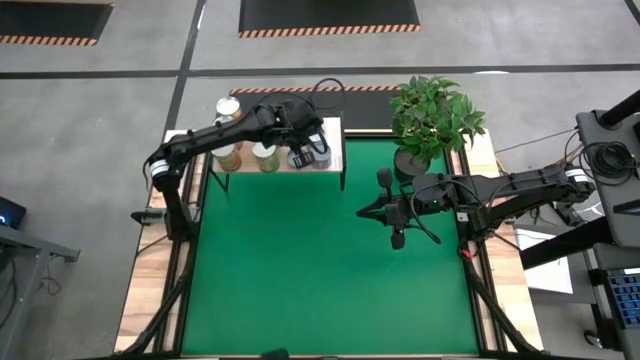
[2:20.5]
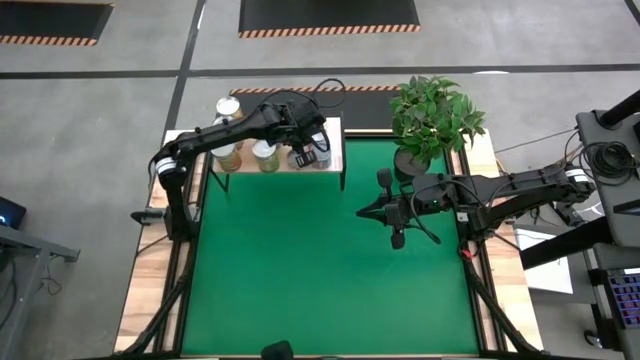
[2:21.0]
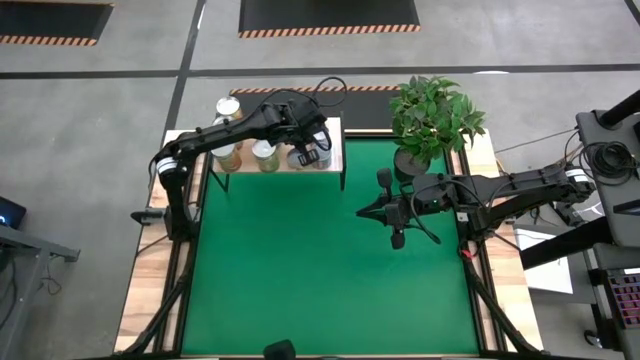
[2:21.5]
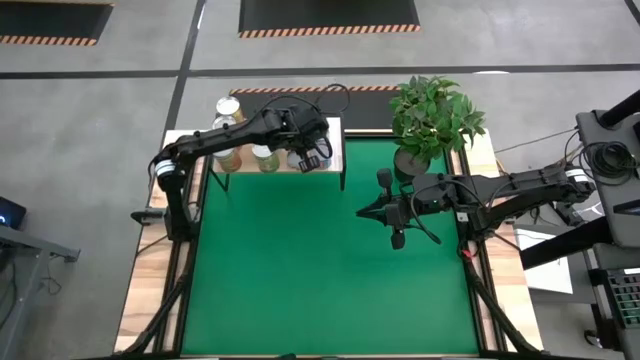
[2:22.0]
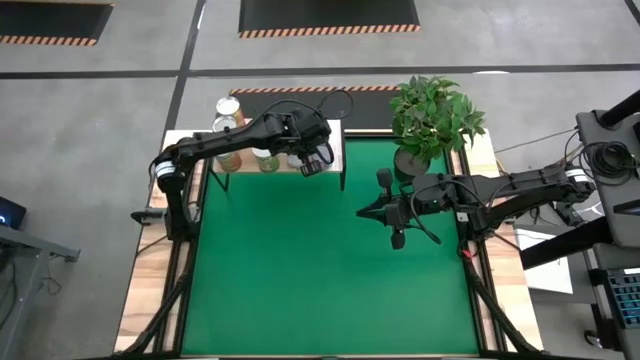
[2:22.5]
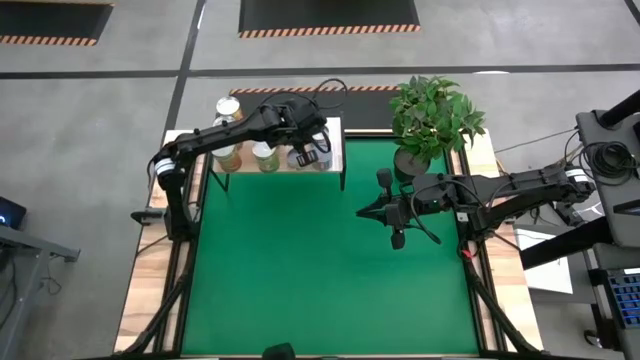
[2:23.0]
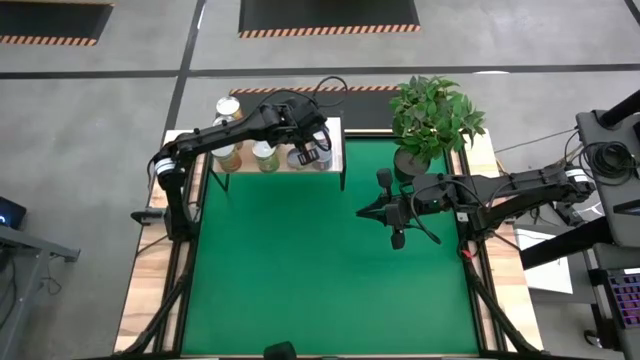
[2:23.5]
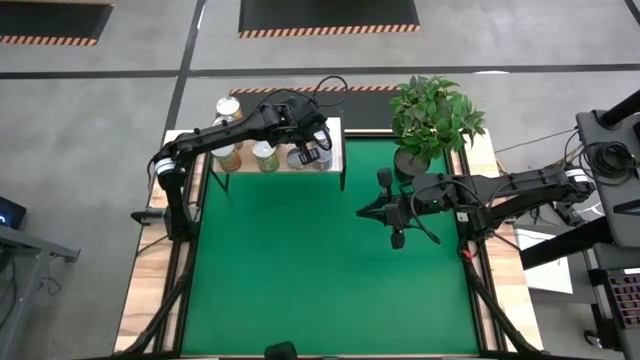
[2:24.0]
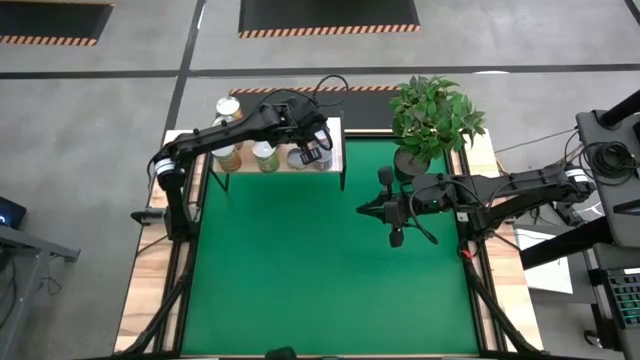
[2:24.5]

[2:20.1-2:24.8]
Task: Pick and place cans onto a shelf
Adjust the cans on the shelf

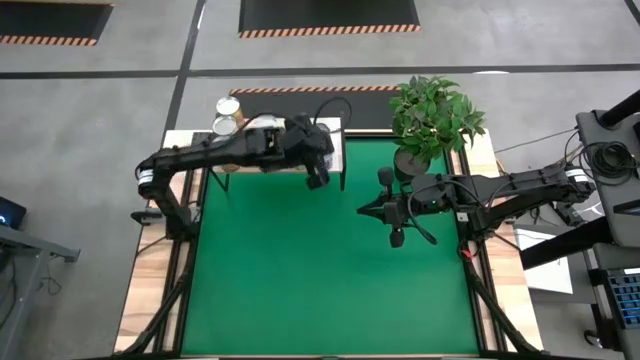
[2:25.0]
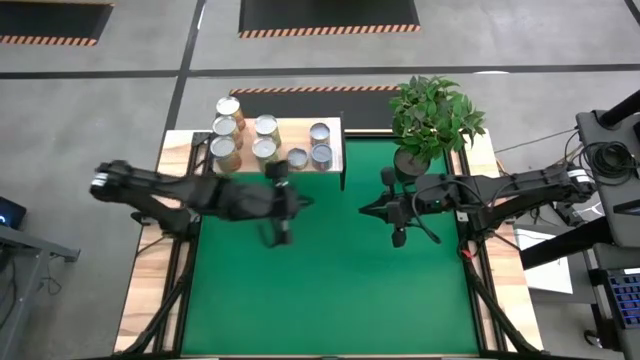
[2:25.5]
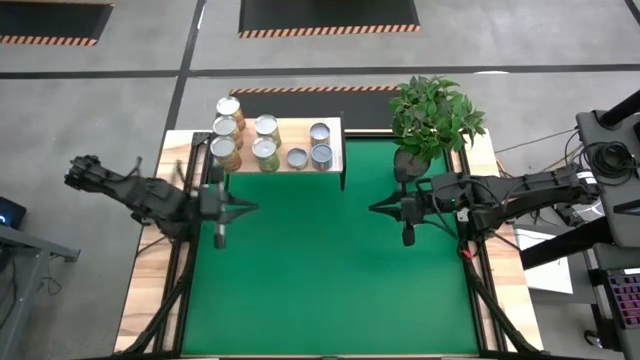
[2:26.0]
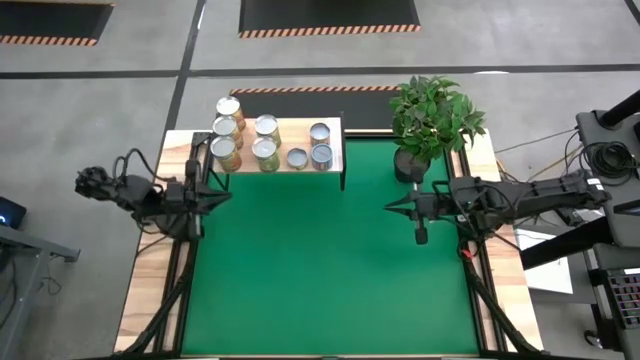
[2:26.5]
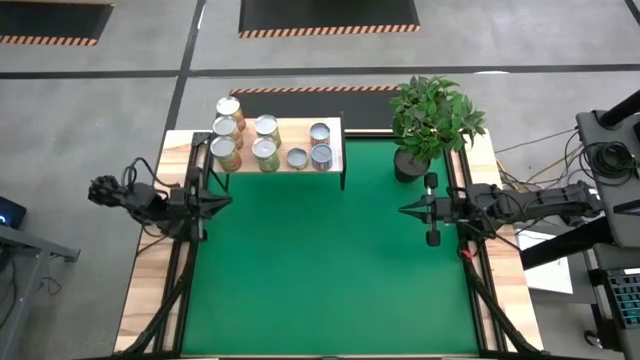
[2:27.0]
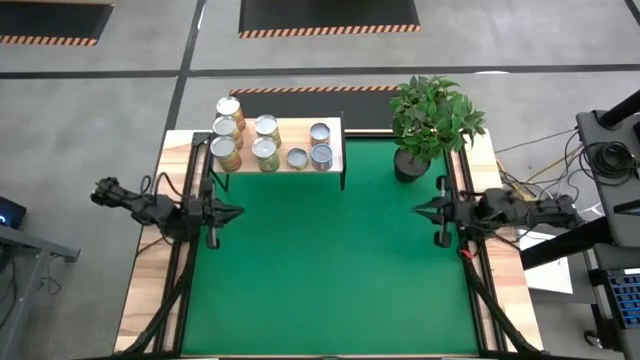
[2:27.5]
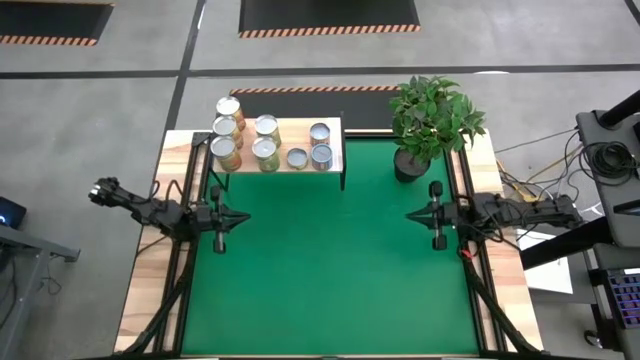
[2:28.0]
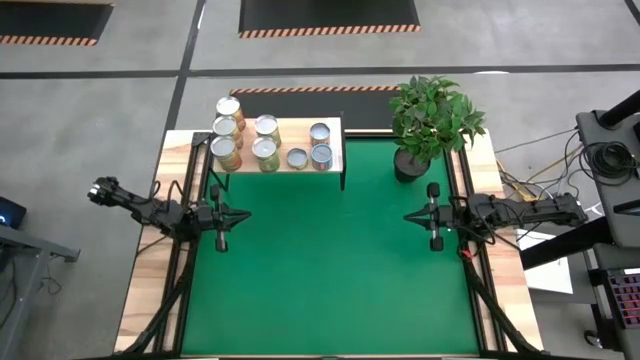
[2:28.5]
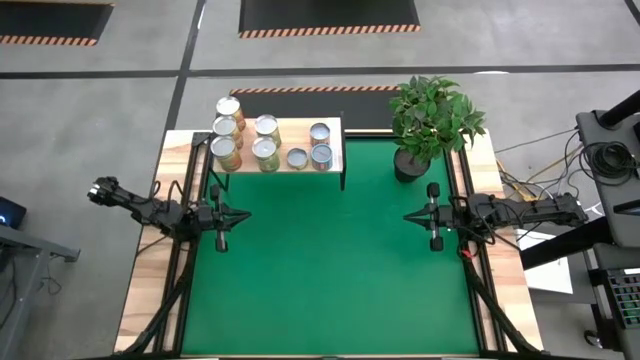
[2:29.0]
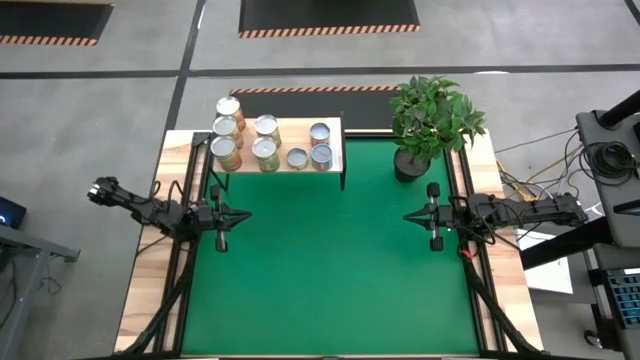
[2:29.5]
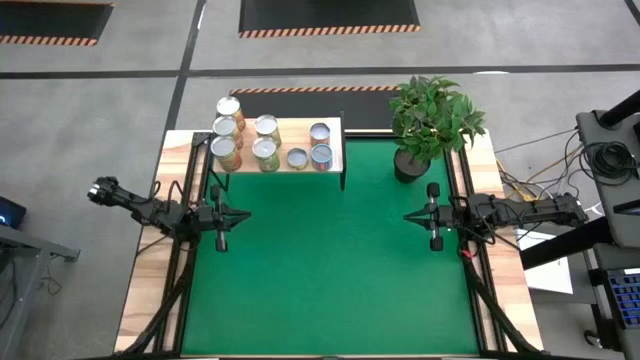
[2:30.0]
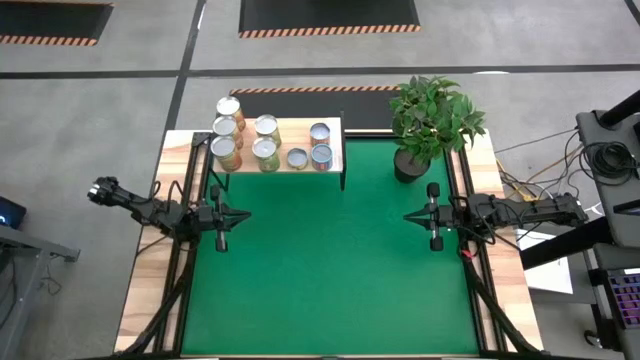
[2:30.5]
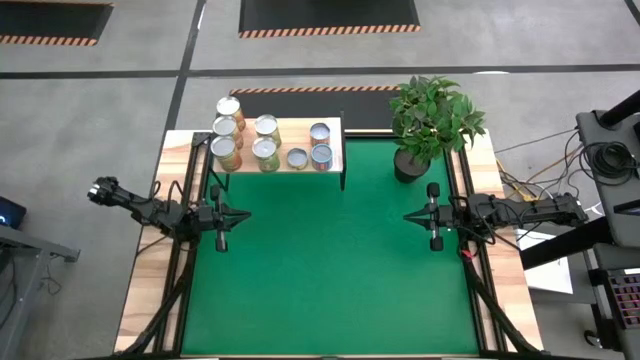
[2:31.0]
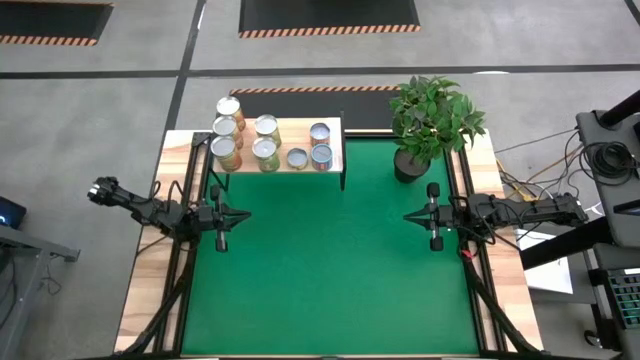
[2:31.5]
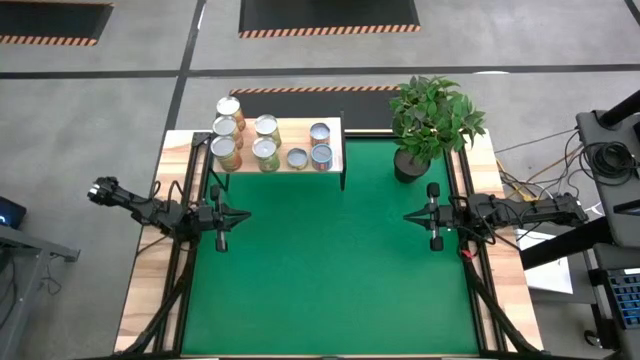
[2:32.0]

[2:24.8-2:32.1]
Return to Home Position

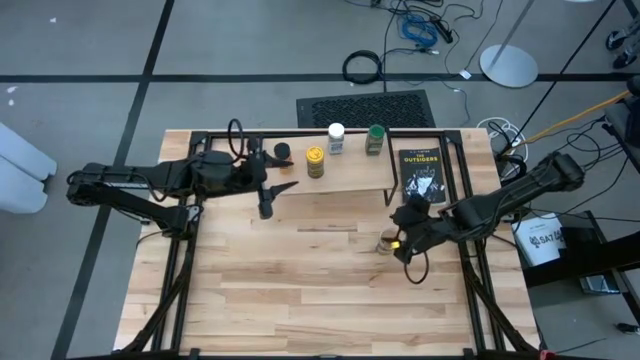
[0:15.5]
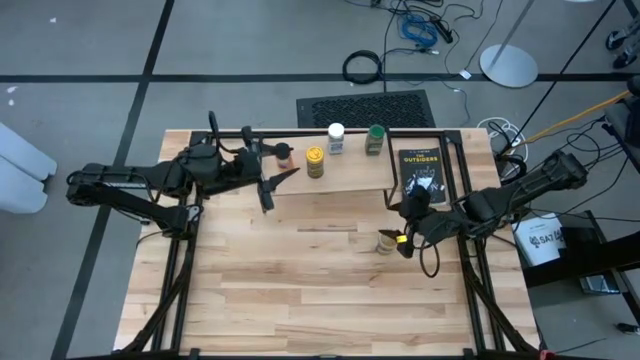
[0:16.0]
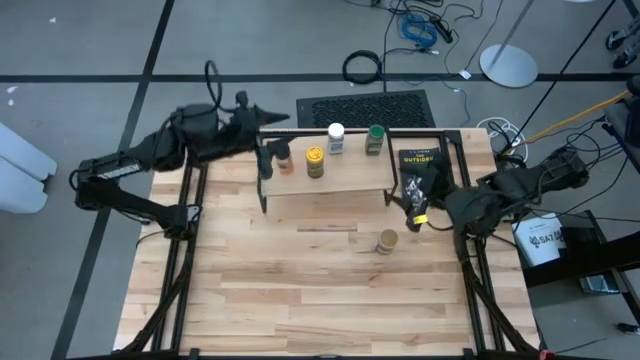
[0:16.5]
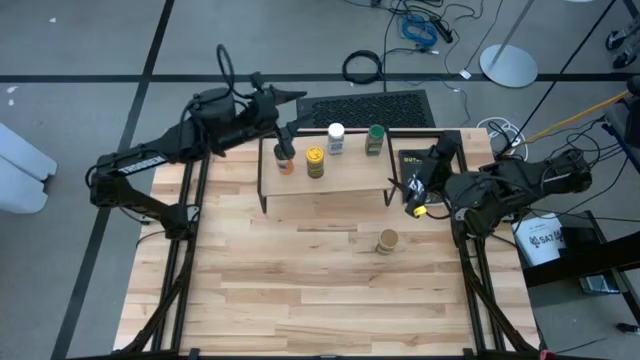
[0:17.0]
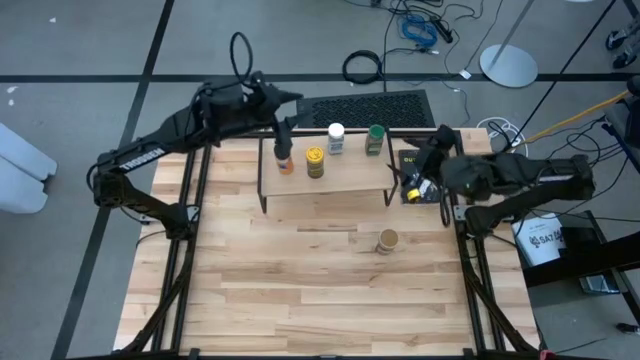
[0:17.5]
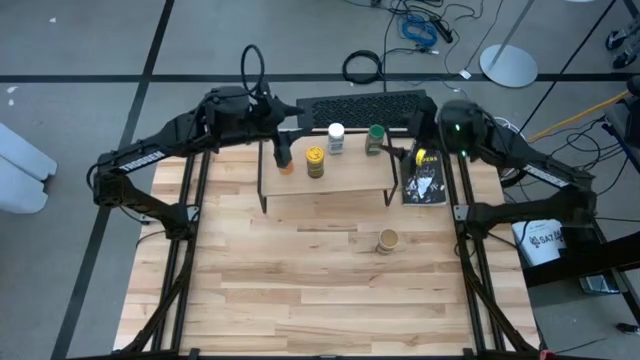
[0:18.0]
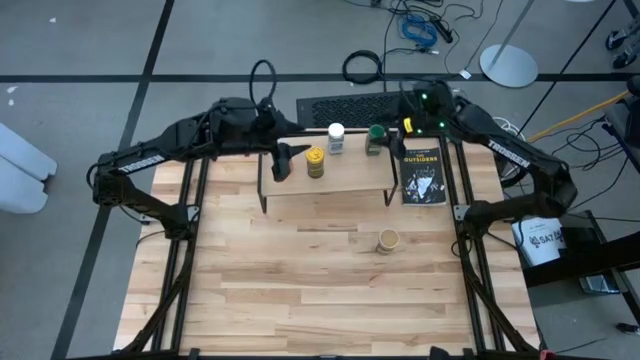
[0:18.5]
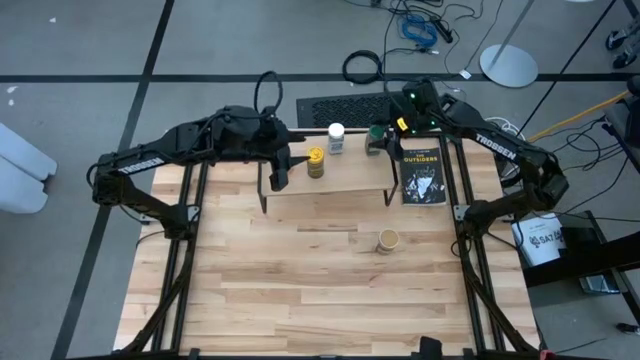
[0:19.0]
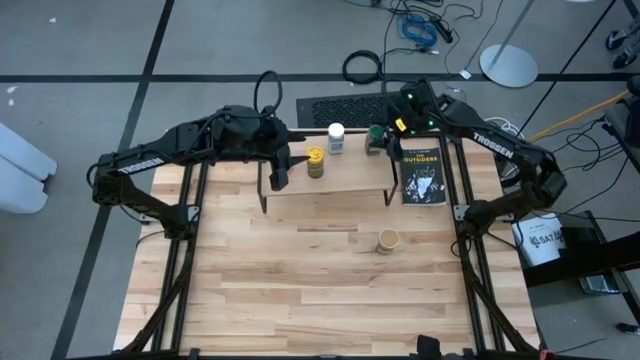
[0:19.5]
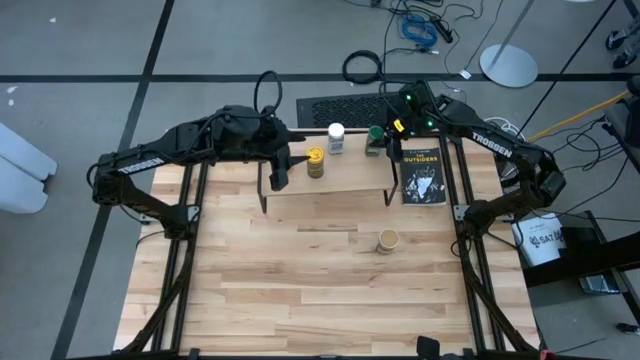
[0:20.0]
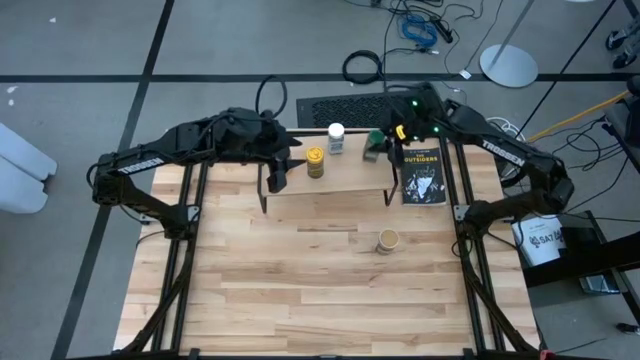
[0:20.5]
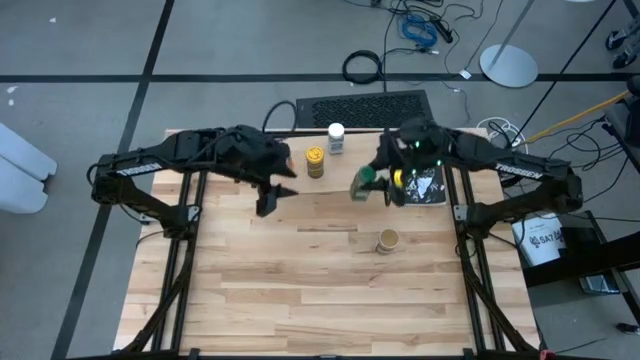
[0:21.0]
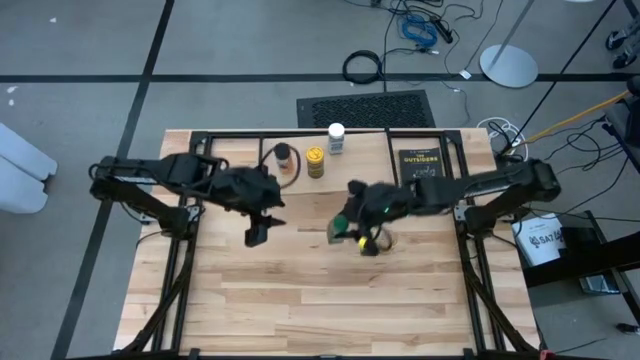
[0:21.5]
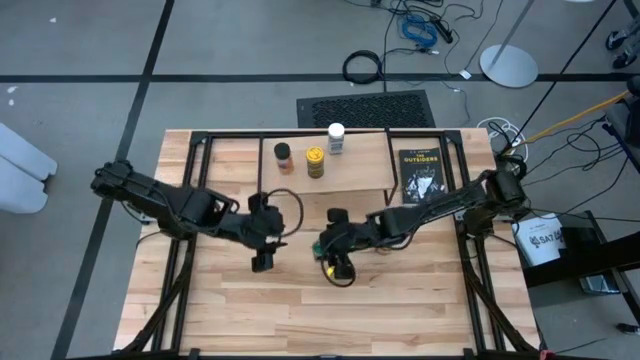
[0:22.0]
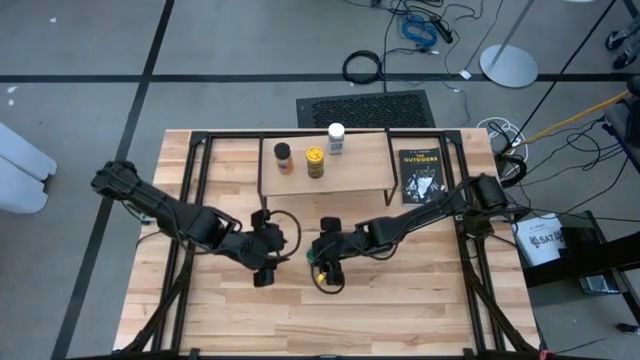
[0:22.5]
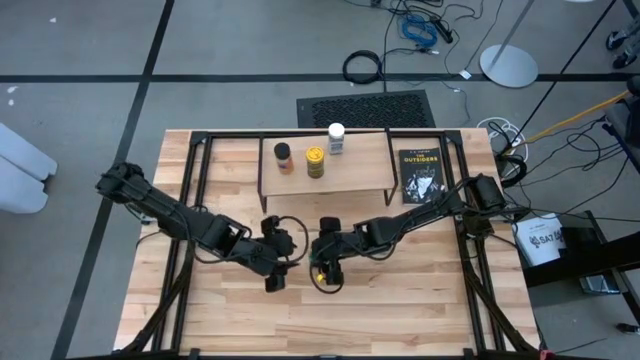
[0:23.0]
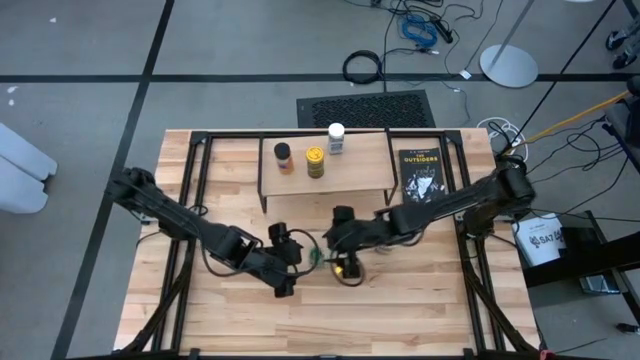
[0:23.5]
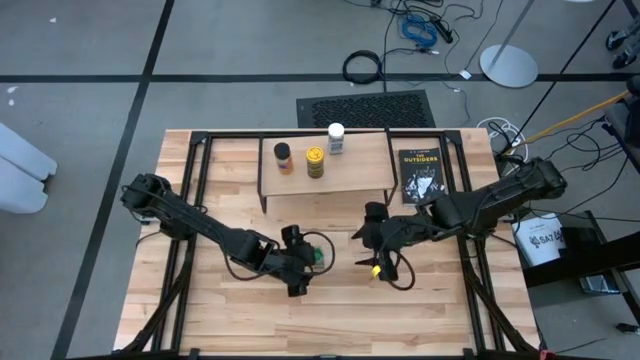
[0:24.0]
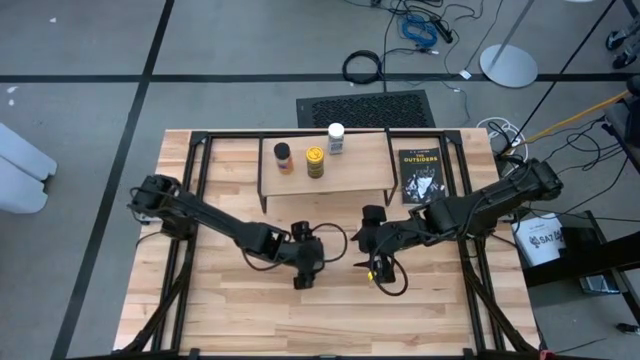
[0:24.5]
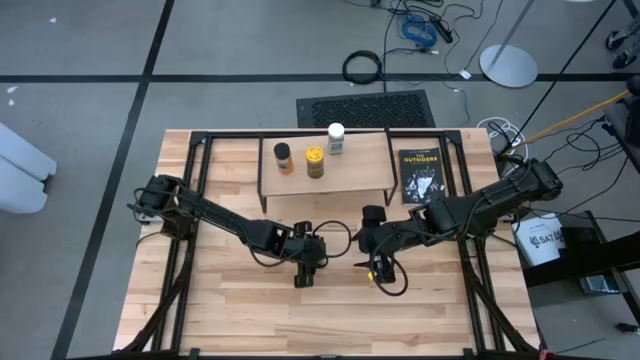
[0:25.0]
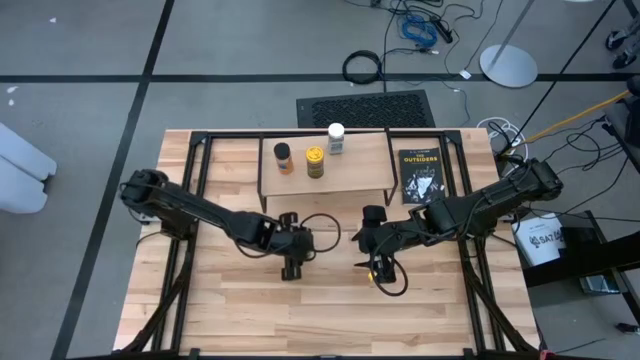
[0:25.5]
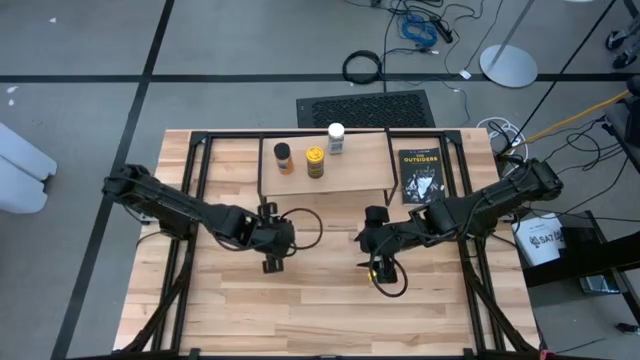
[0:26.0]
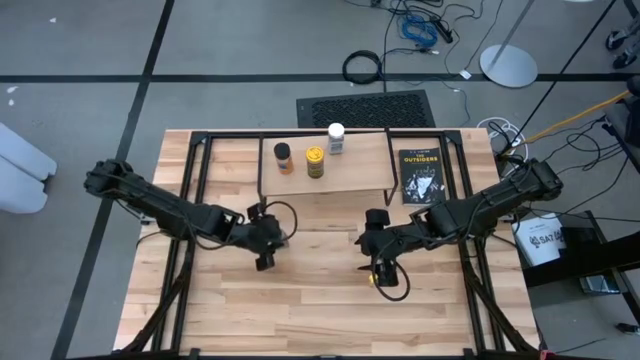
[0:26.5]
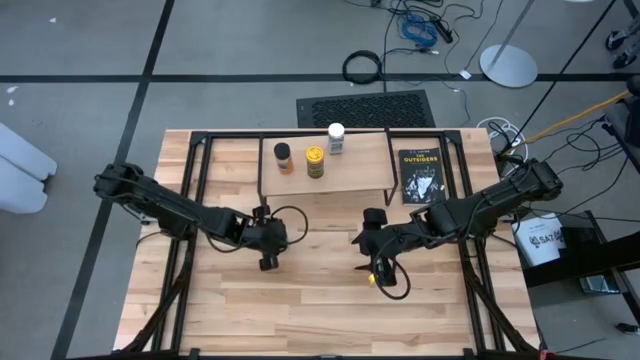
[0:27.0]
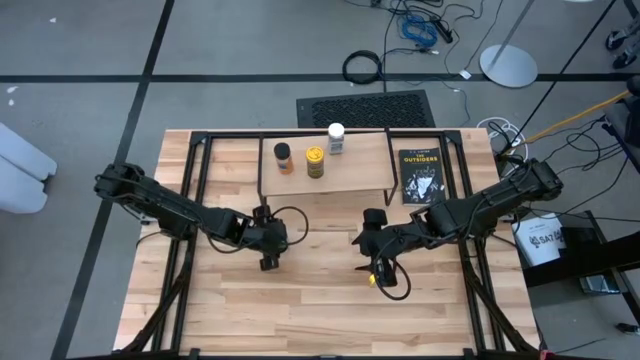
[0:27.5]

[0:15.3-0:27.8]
Task: Shelf spices
Remove the green seasoning bottle from the shelf
